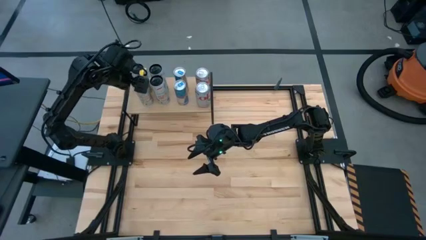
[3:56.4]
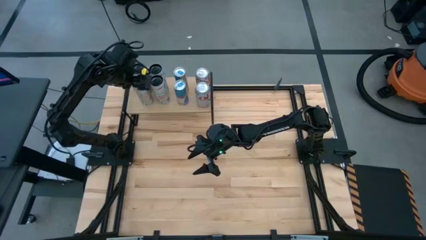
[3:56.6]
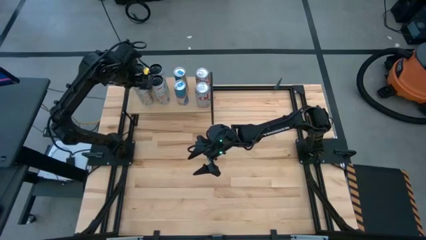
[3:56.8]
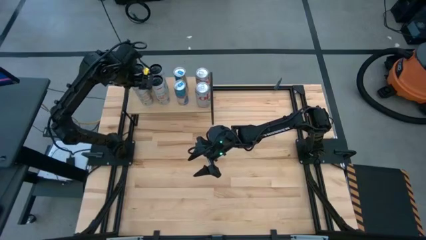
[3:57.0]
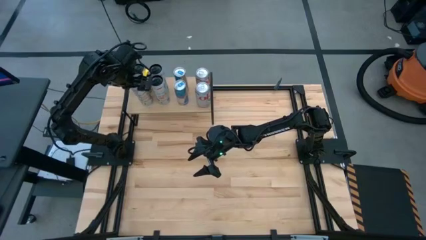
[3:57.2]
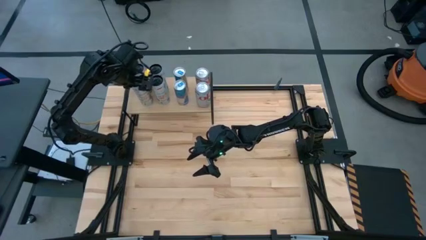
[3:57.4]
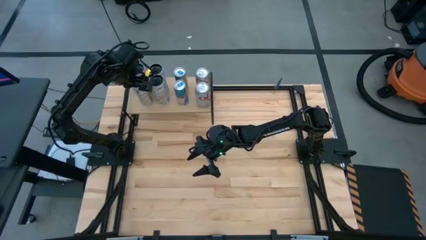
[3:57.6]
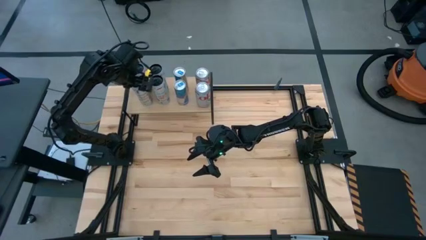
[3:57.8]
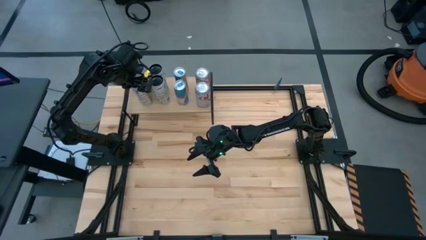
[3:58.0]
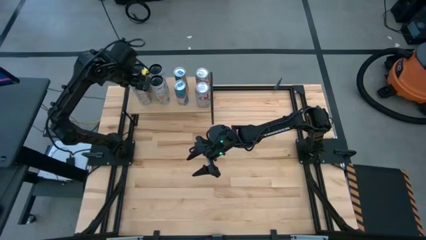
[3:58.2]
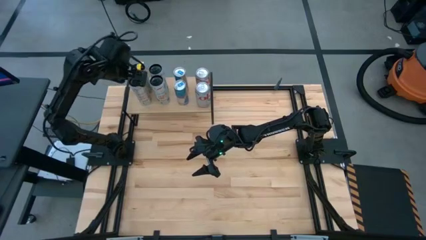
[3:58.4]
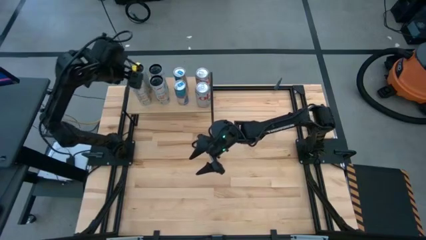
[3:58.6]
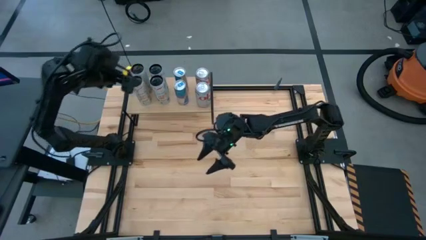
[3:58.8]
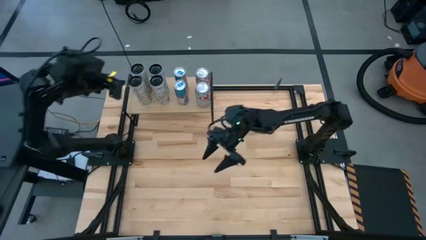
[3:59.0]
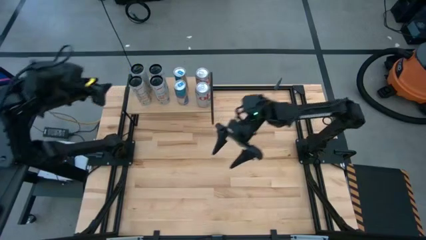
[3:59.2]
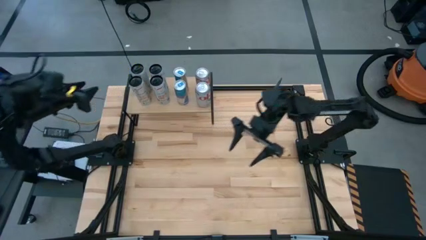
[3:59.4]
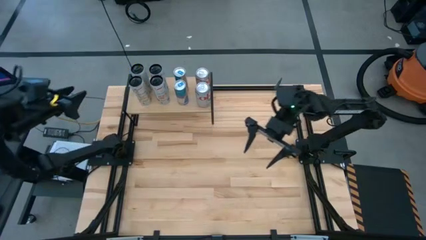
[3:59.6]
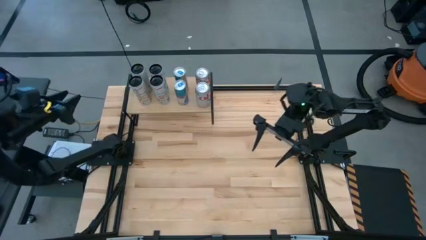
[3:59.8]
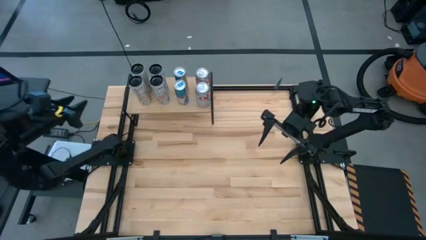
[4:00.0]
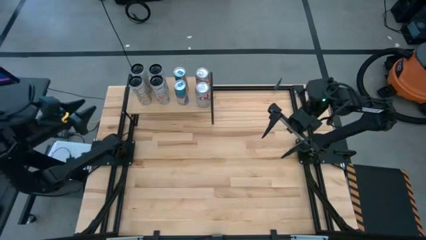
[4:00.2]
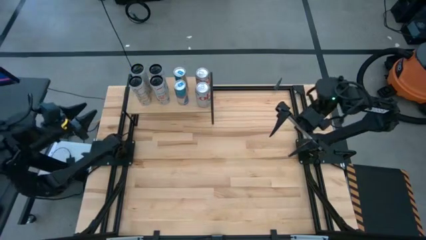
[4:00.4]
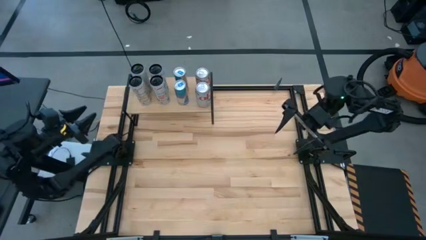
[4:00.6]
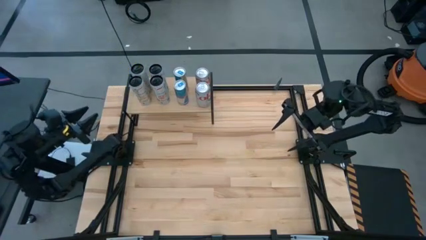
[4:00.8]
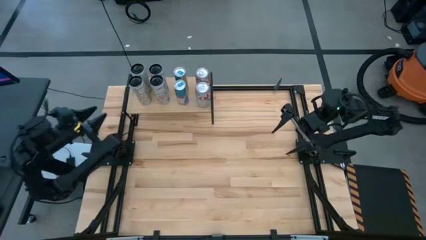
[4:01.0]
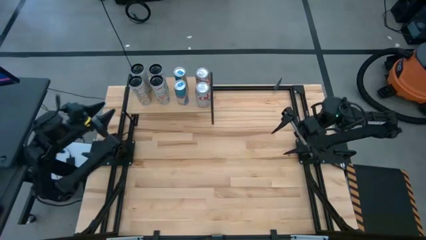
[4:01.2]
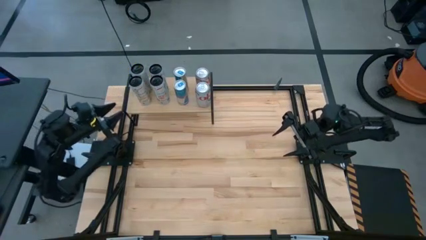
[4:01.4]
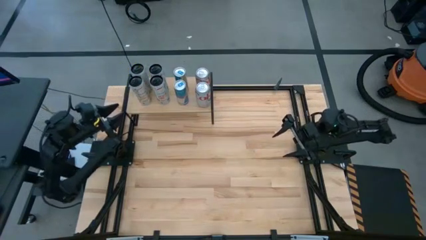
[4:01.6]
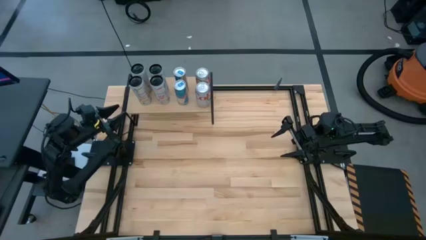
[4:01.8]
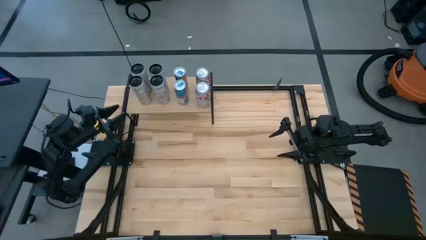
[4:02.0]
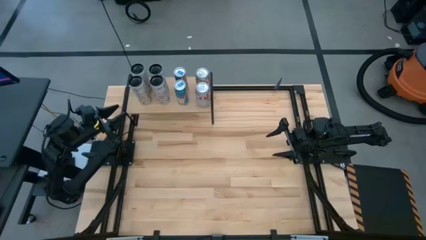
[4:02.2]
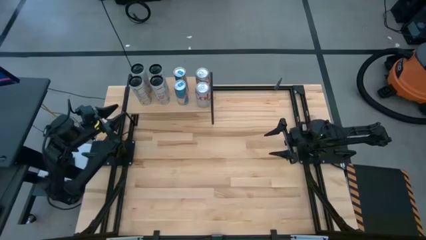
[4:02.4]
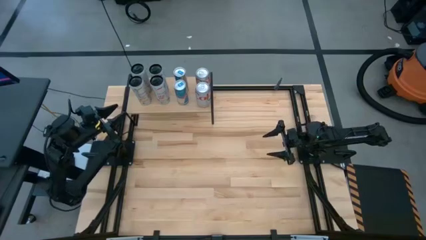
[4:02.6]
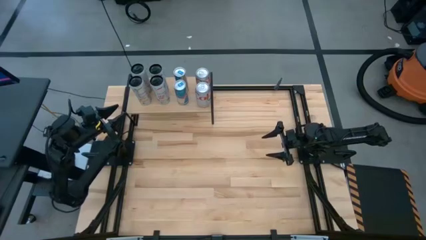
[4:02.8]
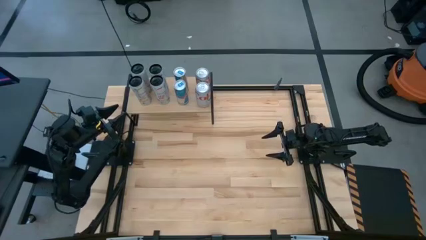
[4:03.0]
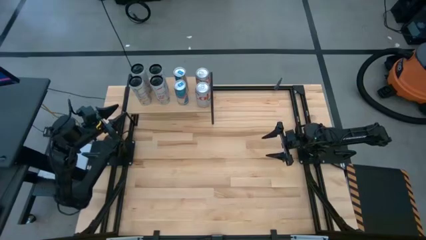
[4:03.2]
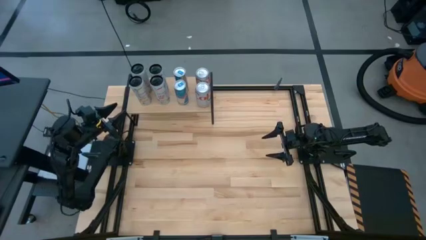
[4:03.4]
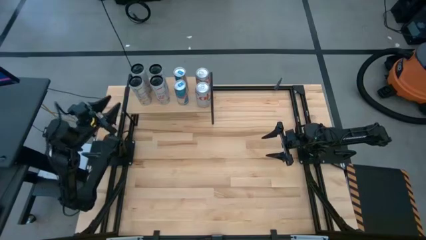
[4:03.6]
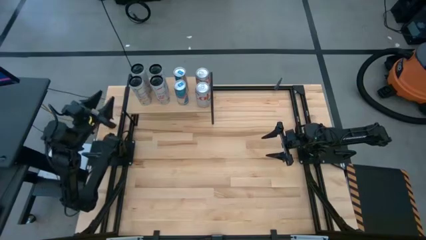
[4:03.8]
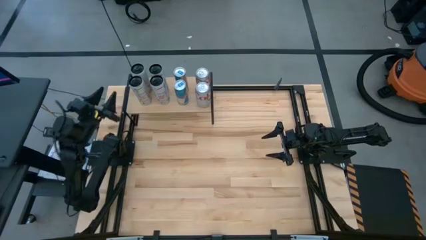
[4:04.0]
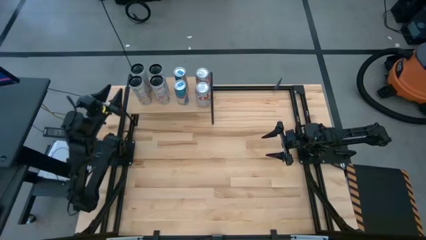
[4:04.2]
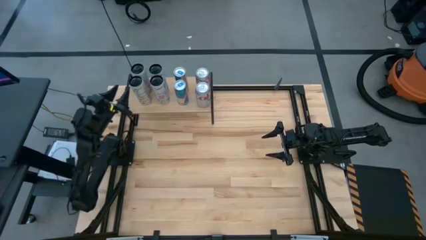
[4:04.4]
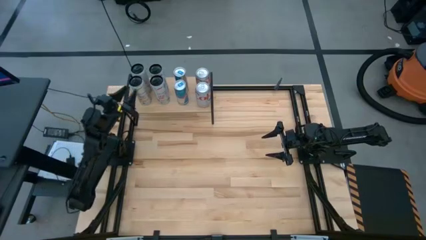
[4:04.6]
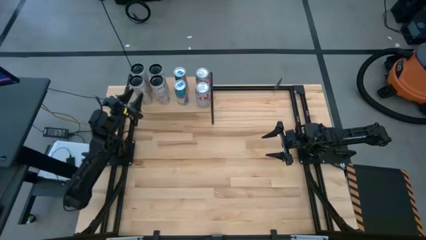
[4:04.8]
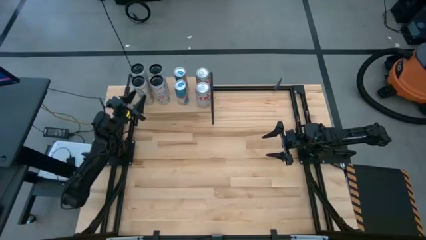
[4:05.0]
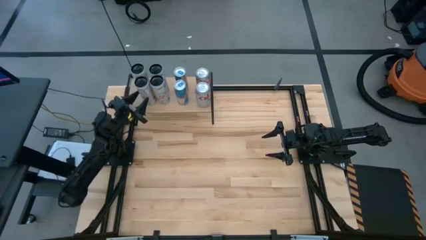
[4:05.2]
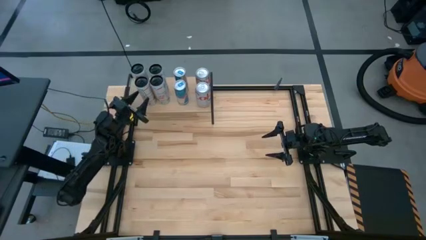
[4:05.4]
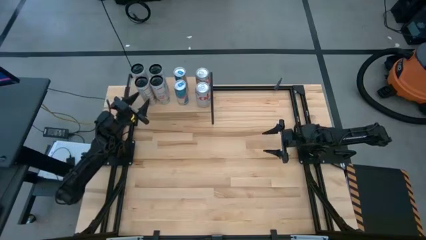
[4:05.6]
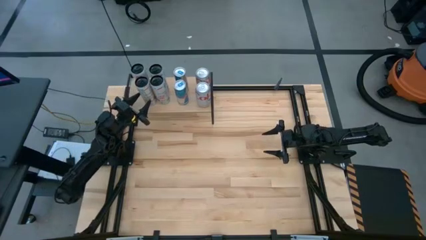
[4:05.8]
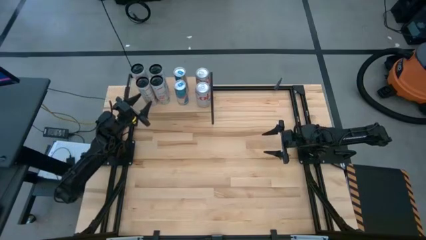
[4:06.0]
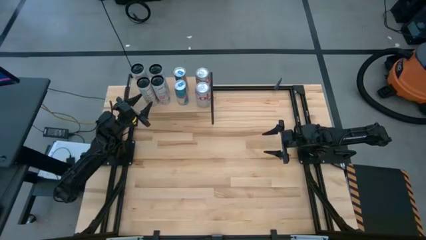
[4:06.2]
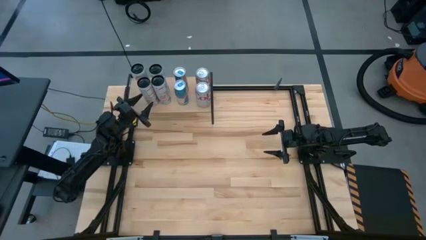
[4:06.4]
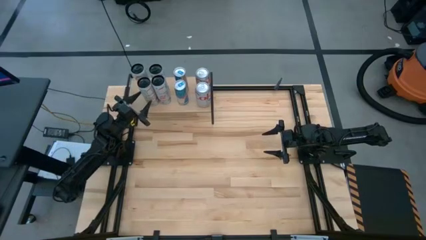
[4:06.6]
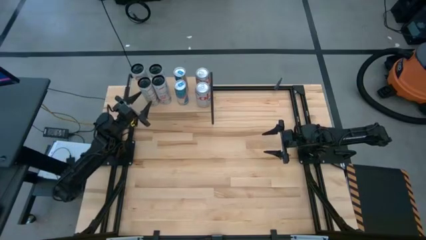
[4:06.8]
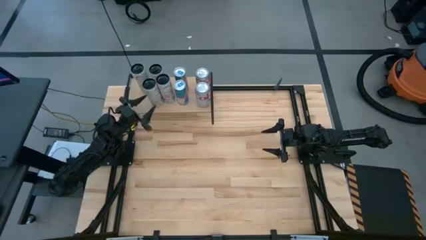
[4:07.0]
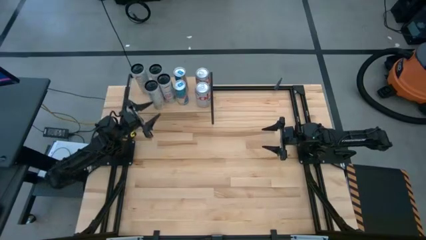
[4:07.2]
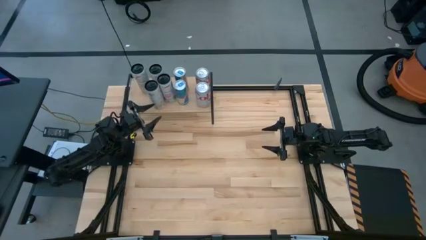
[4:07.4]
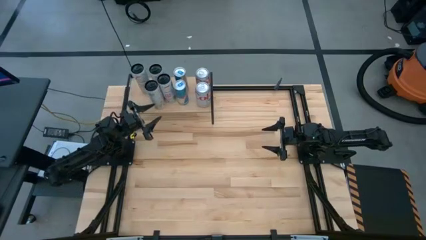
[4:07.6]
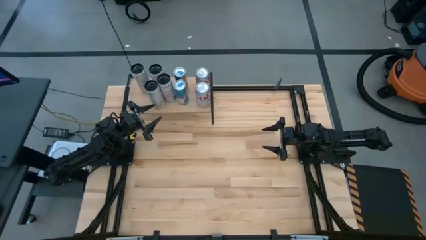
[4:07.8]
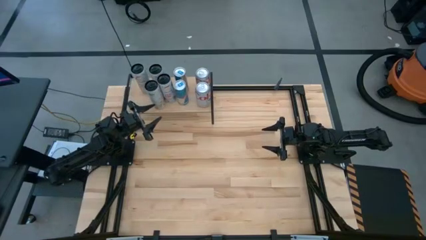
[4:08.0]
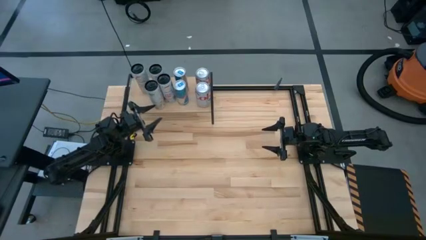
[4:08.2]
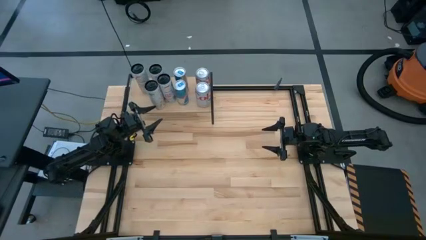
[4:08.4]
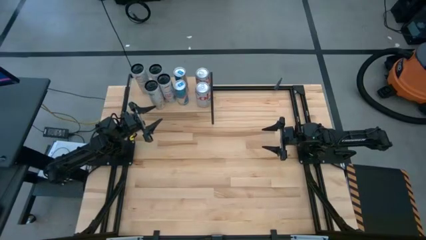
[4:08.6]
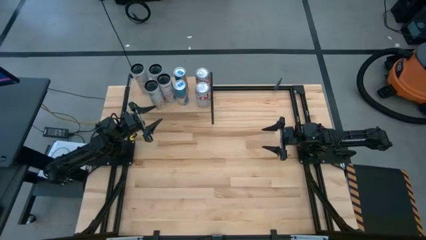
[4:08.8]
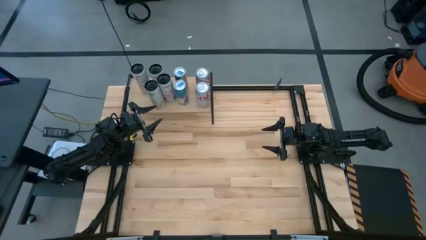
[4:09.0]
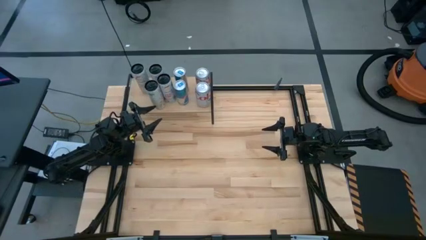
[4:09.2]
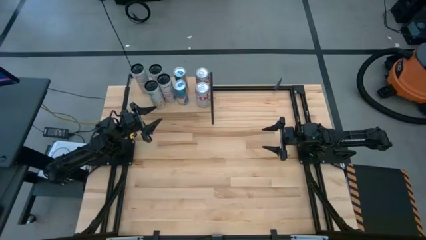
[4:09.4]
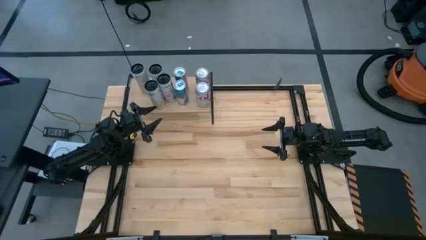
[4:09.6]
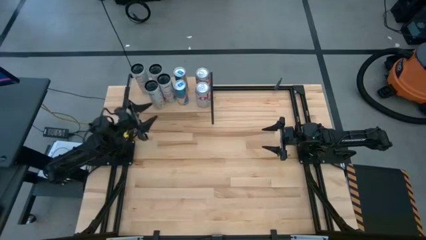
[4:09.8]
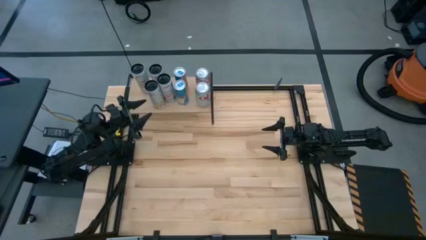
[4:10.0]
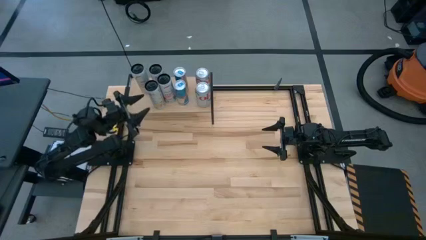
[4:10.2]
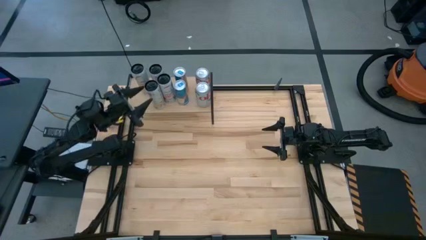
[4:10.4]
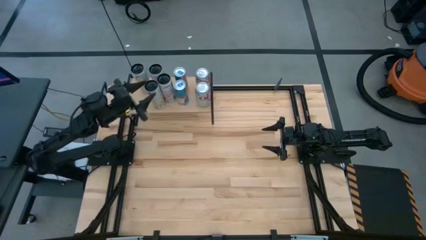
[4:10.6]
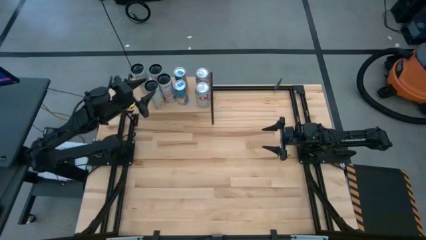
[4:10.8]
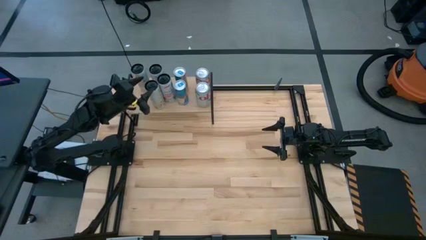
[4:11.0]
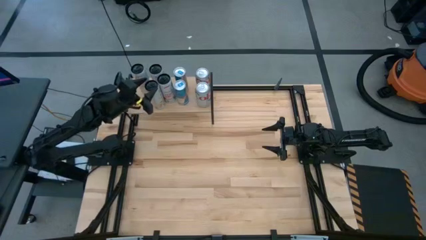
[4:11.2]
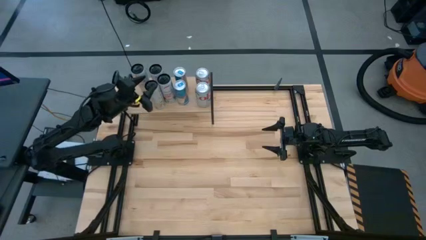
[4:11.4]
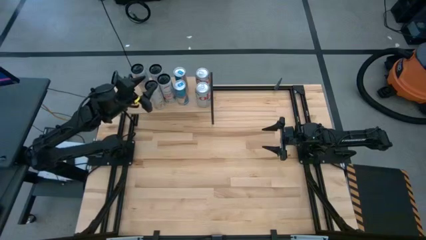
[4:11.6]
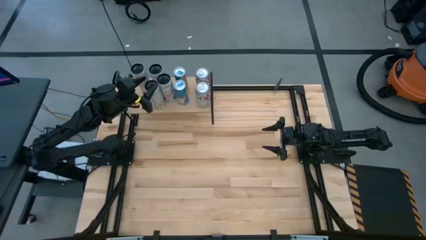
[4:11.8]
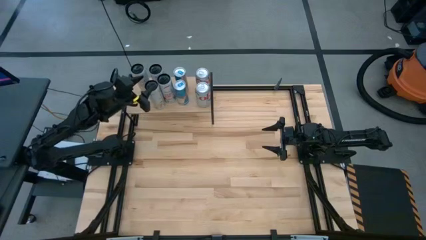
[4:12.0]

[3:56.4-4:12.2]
Task: Place canned beverage on shelf
Put the white-yellow soda can on the shelf aligned with the other white-yellow soda can
